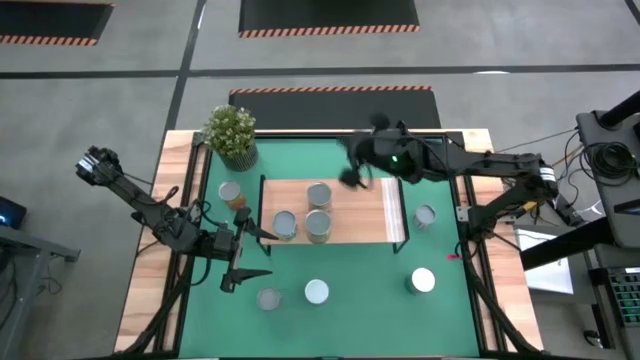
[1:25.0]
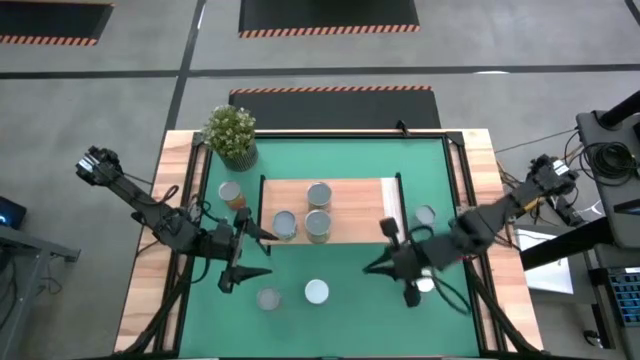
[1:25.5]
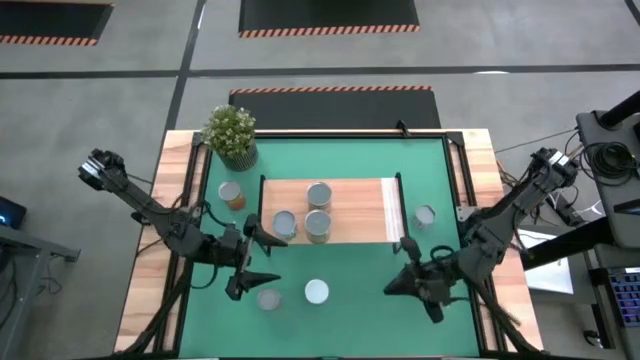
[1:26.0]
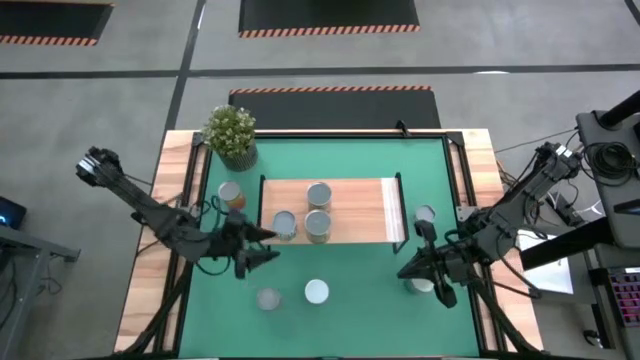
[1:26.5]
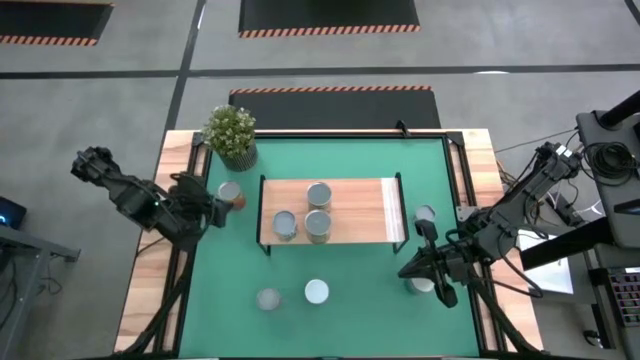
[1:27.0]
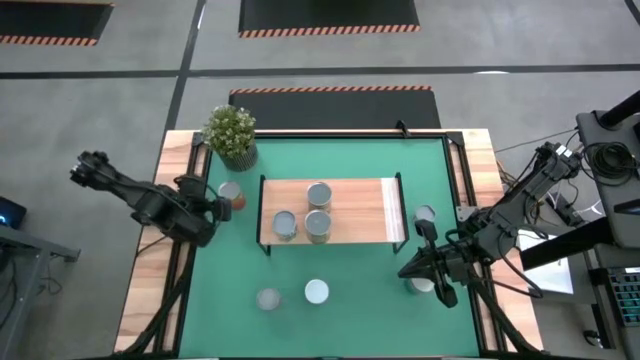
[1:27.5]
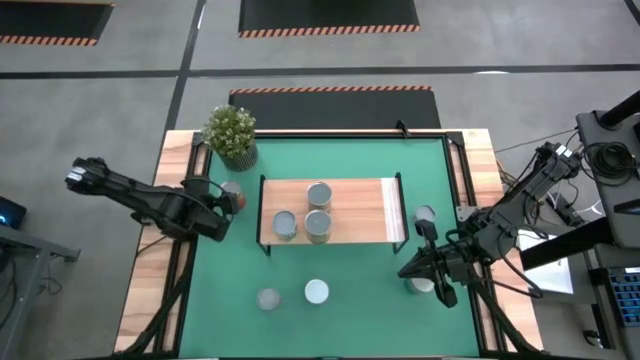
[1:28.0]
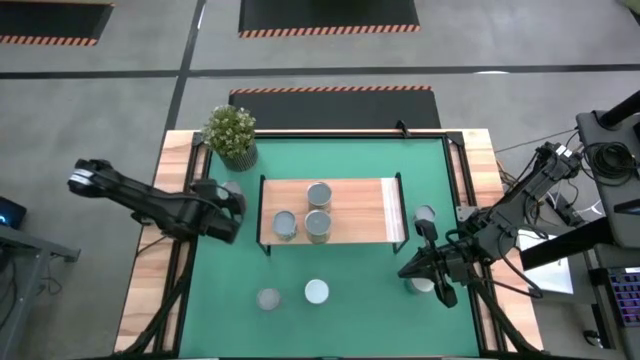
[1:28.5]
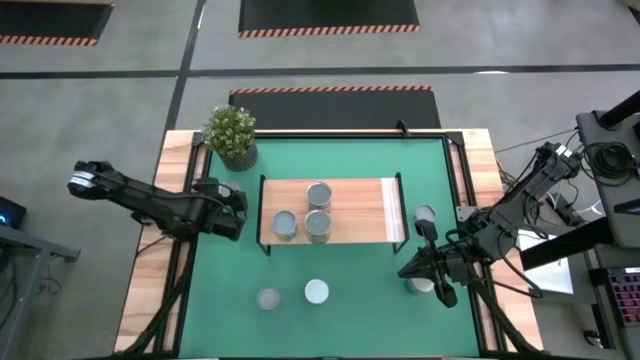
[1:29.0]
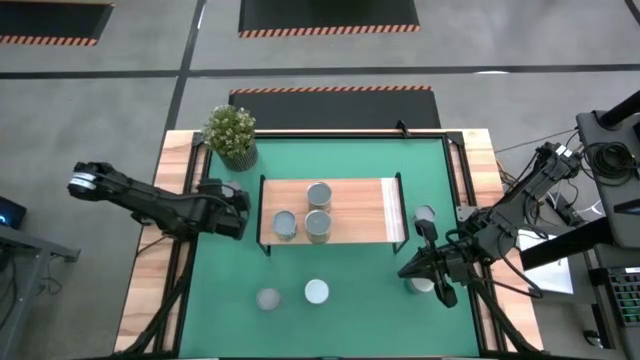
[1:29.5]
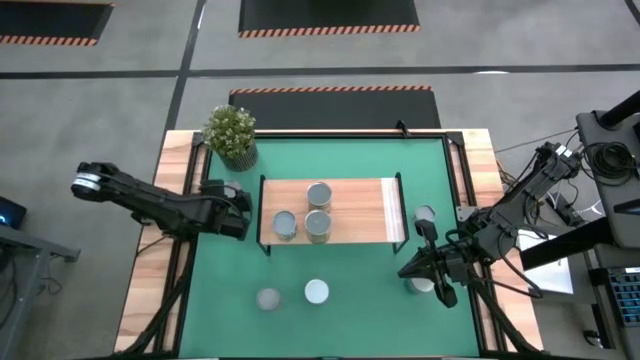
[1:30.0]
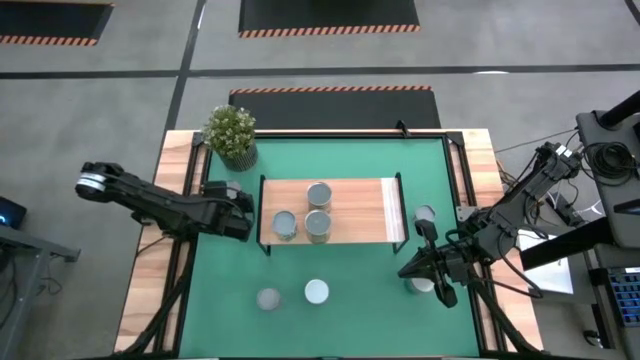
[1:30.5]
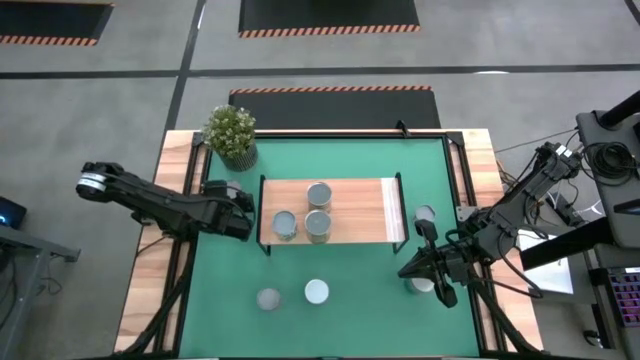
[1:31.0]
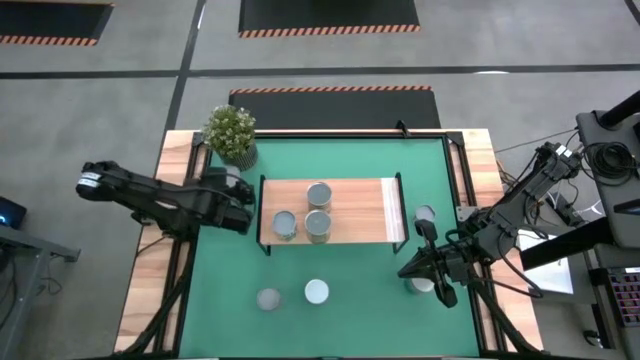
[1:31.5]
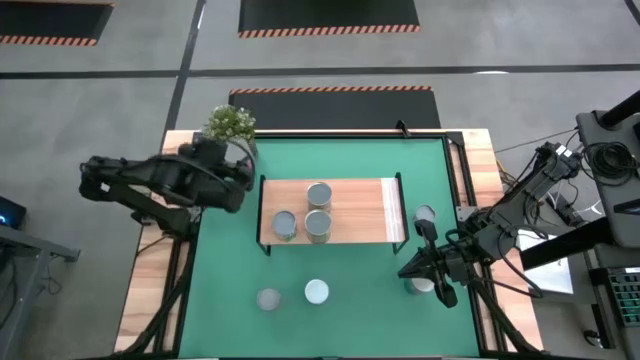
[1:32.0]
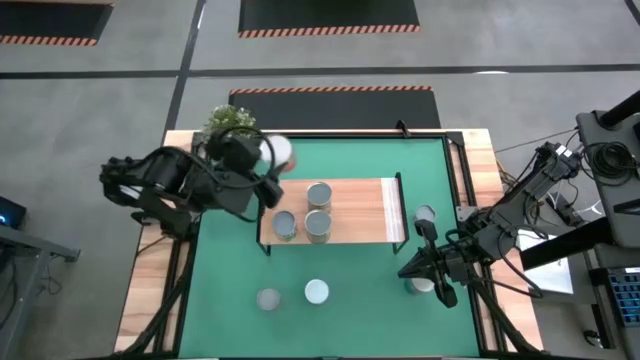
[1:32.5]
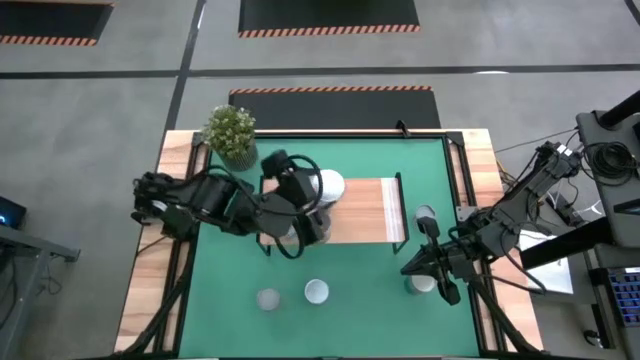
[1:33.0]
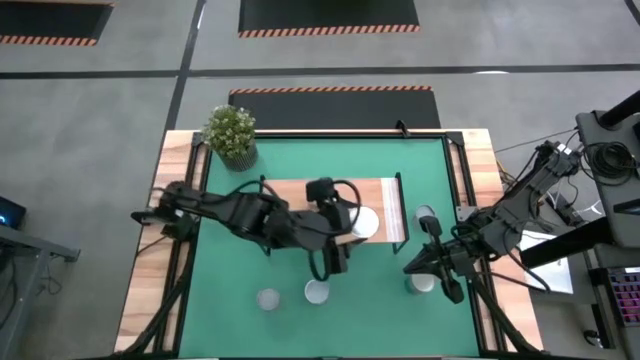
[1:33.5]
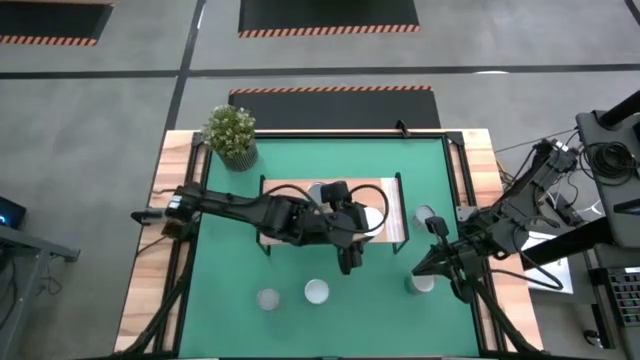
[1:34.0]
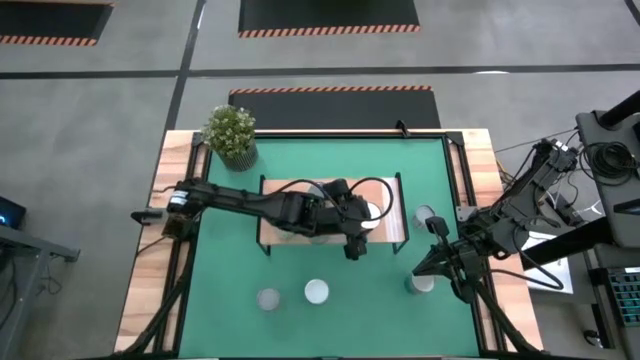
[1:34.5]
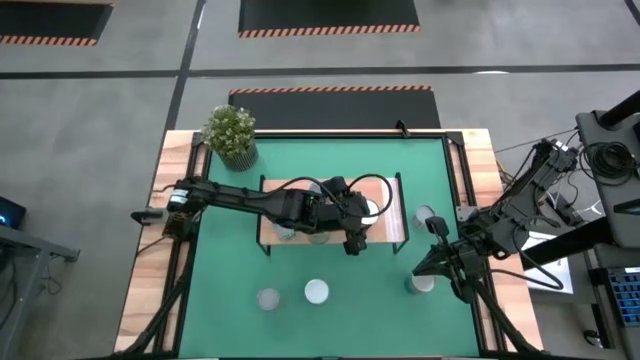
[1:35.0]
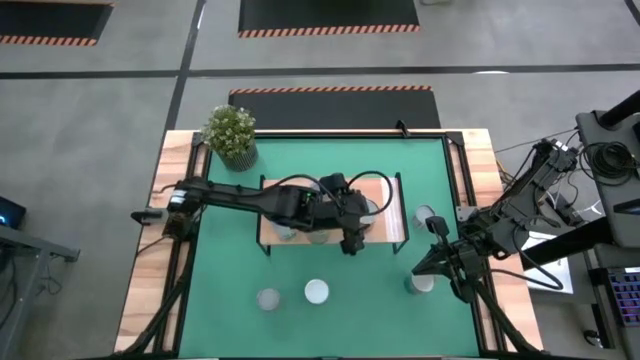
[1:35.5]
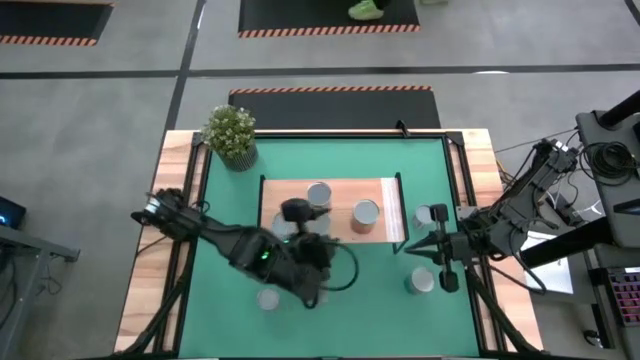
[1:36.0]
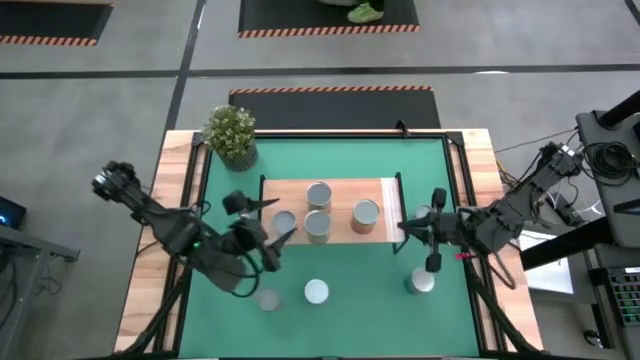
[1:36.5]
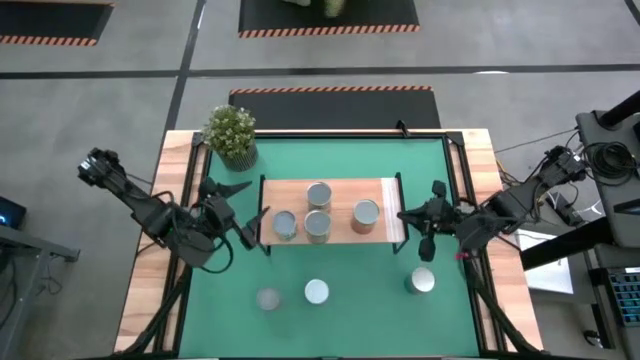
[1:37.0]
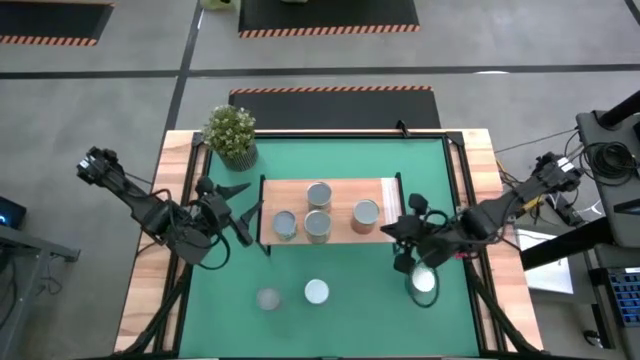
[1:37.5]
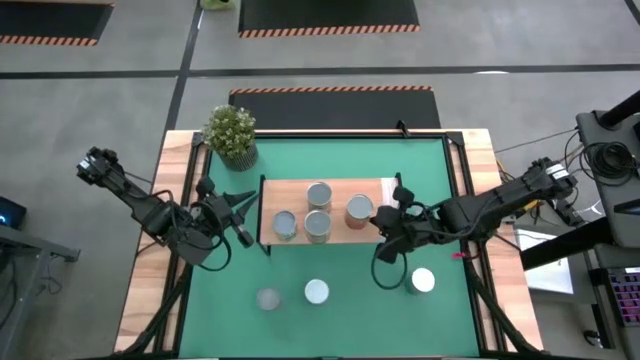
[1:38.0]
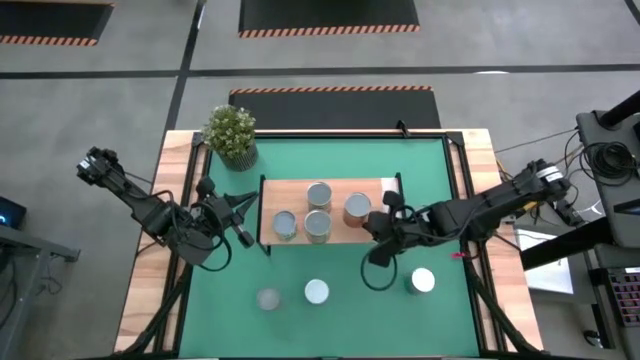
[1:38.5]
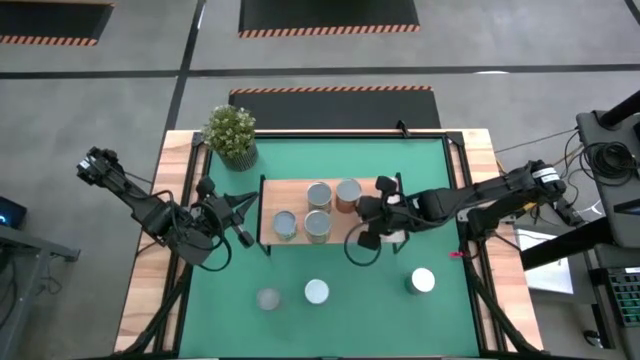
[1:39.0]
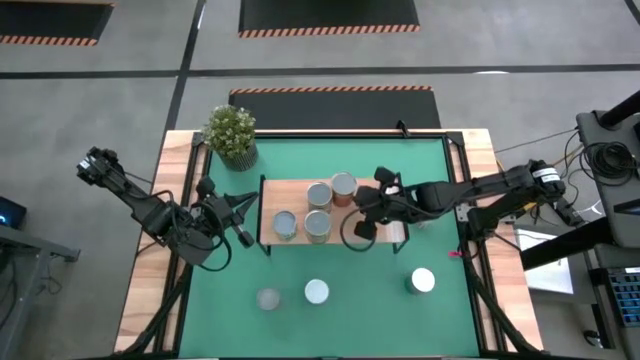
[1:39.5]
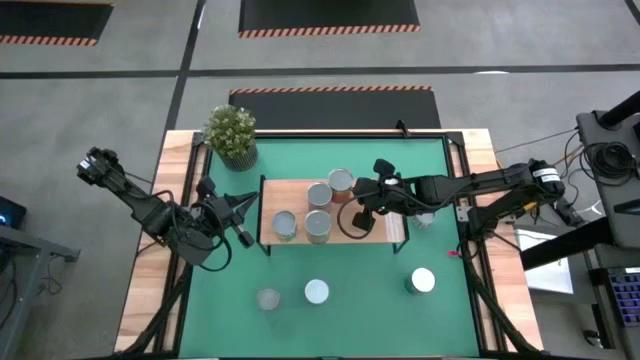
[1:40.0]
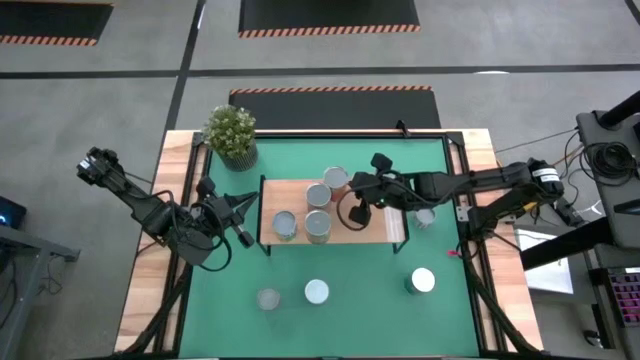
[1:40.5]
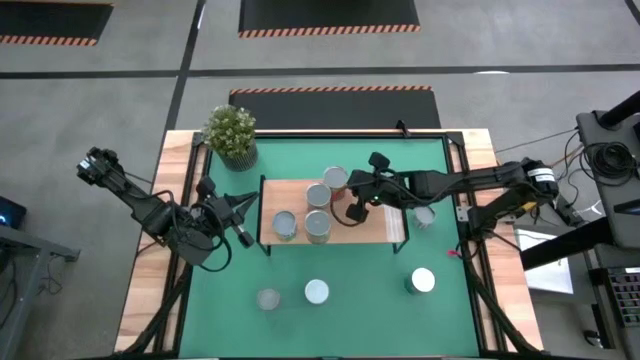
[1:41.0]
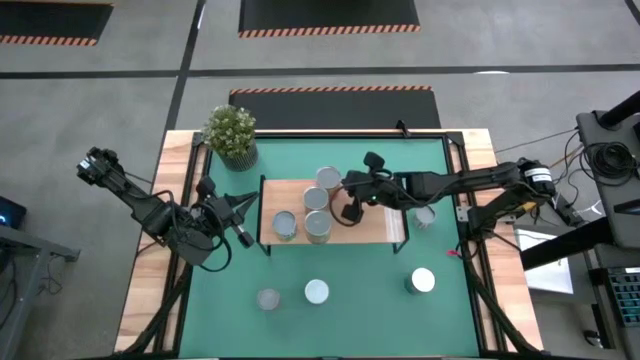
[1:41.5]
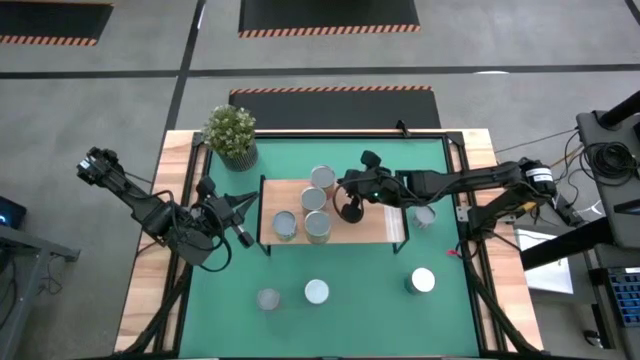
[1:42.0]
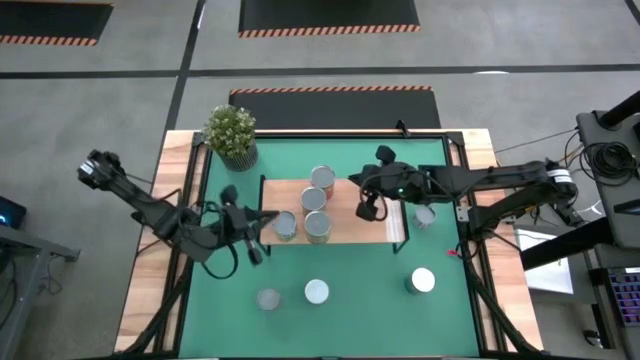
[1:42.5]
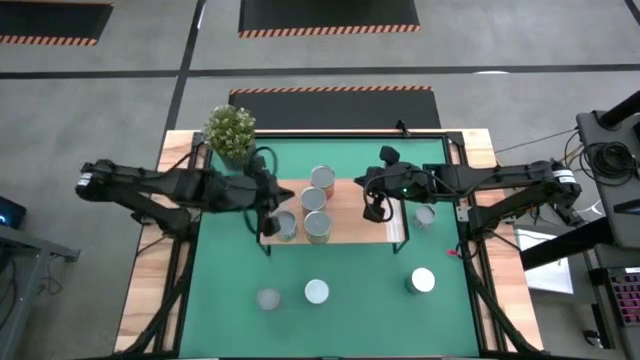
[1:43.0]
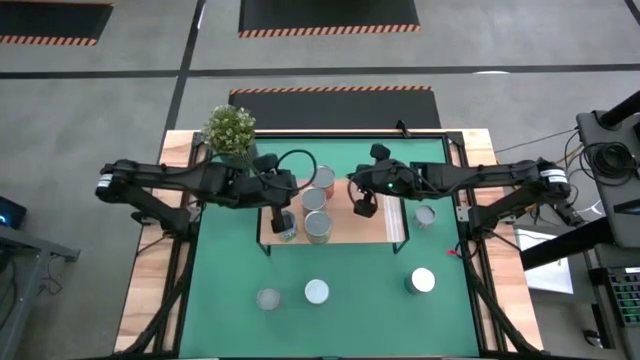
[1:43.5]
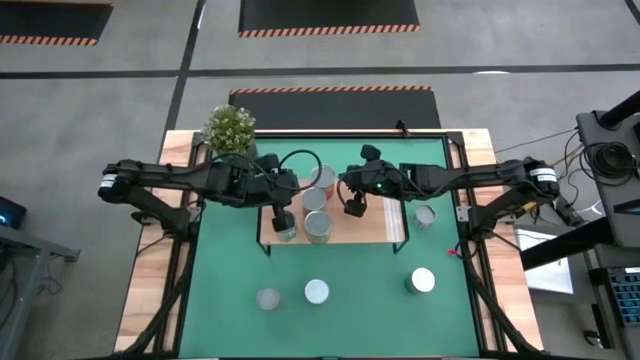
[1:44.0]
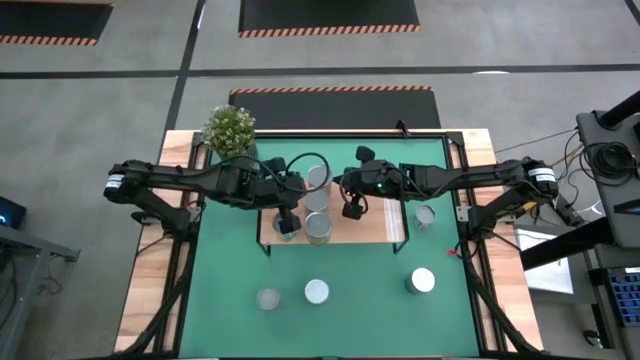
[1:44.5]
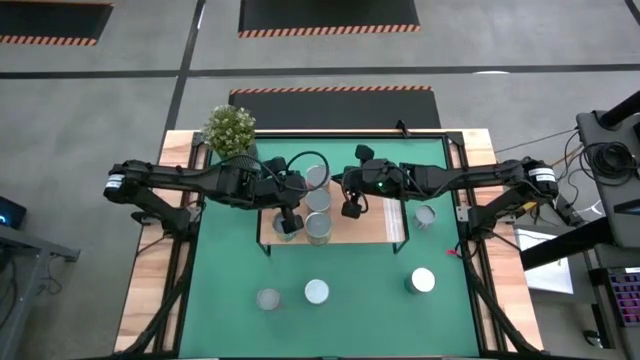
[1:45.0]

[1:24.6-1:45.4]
Task: Pick and place cans onto a shelf
Put the canned of pineapples on the shelf

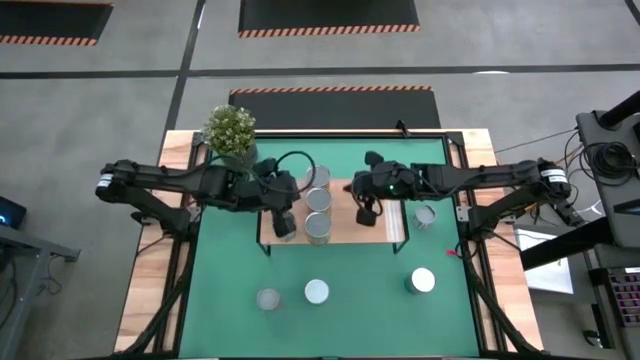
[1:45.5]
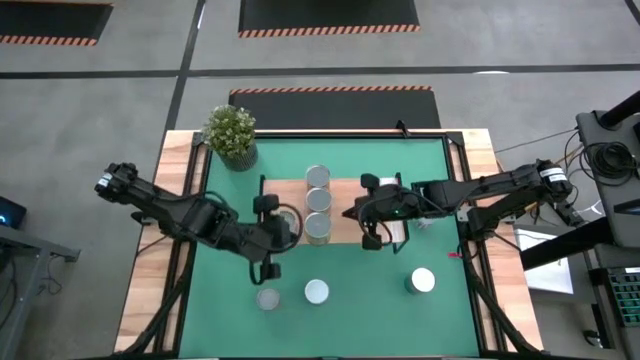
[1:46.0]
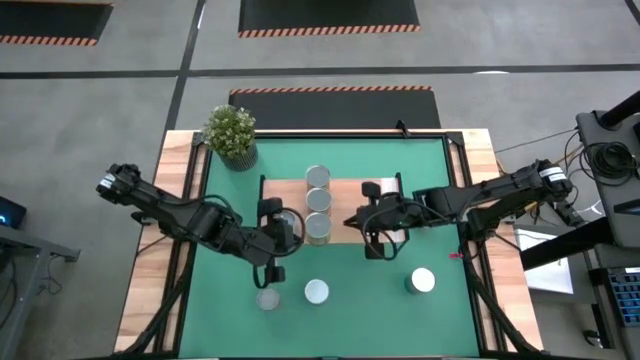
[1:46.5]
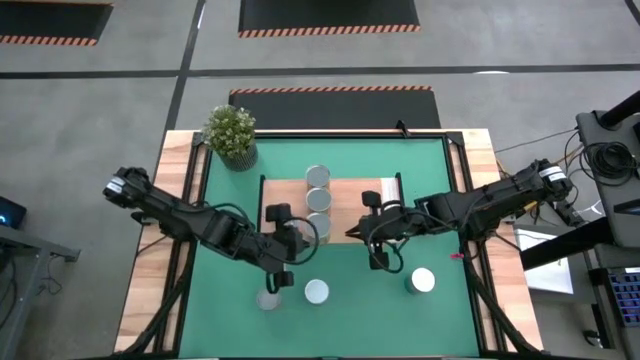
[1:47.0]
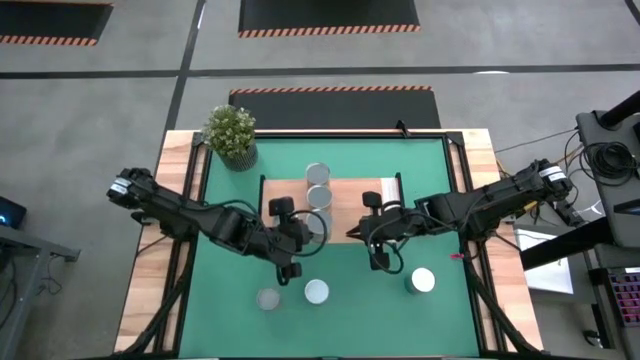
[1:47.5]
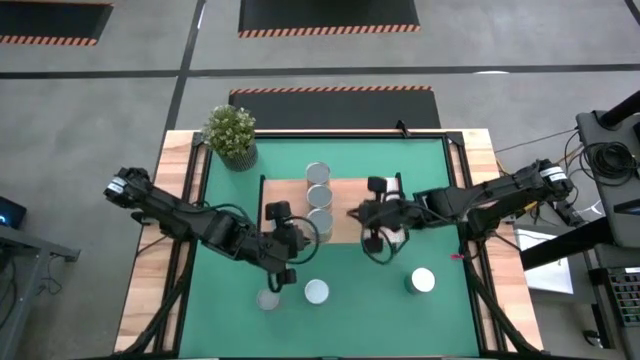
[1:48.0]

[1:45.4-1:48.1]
Adjust the canned of oranges on the shelf

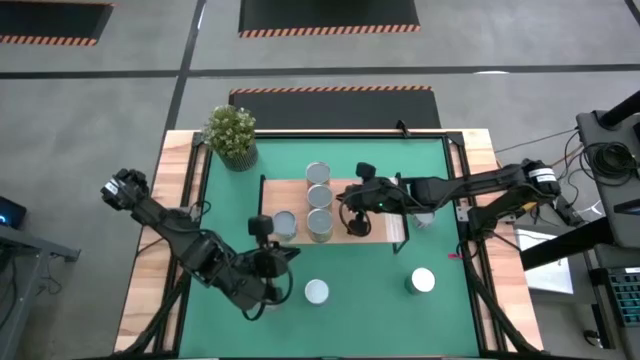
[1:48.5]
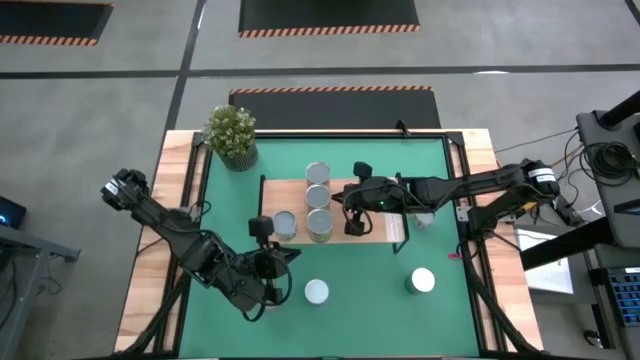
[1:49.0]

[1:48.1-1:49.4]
Adjust the canned of peaches on the shelf
